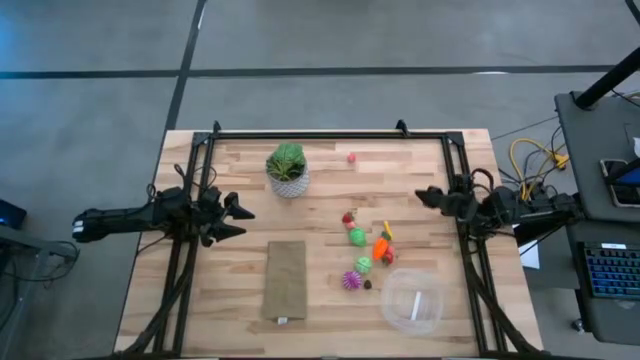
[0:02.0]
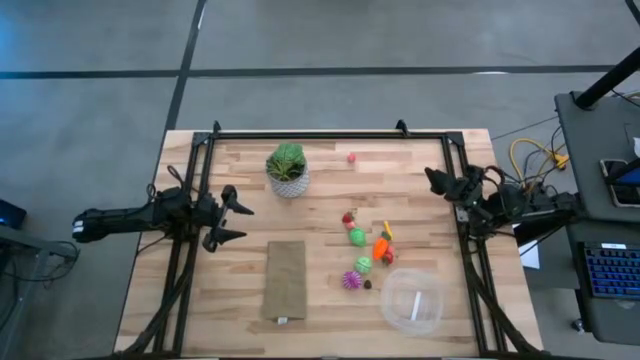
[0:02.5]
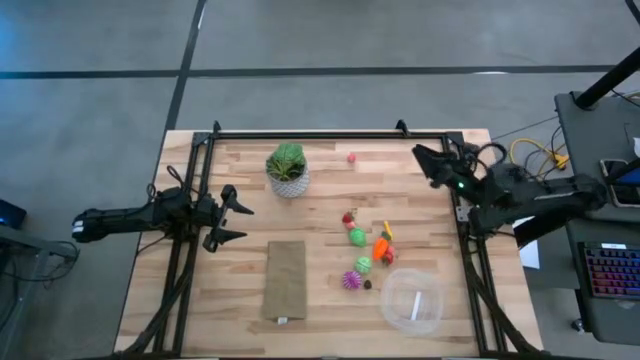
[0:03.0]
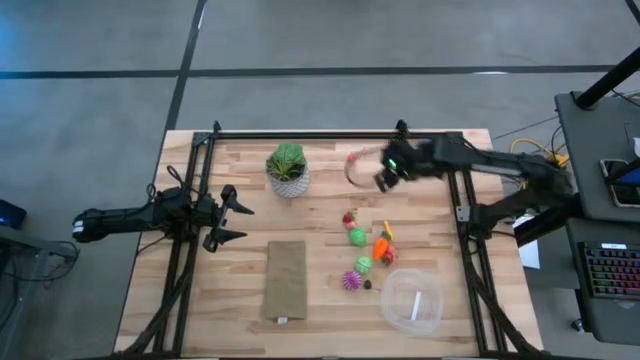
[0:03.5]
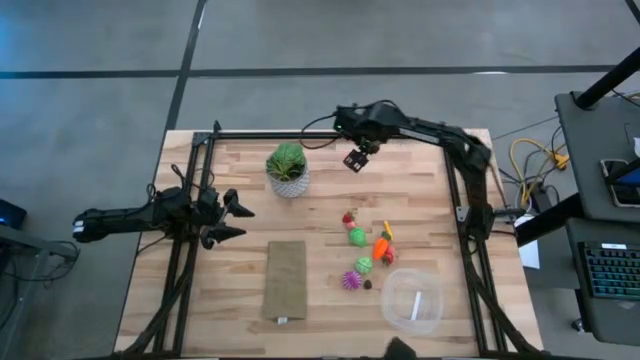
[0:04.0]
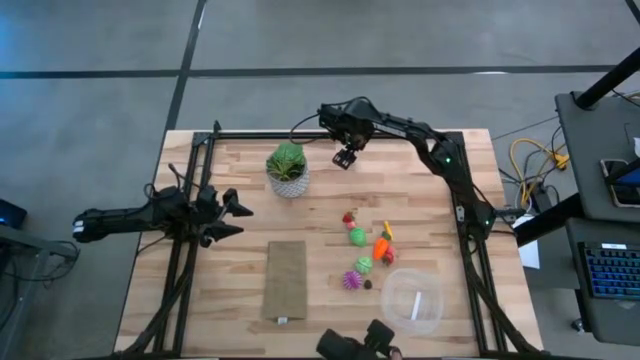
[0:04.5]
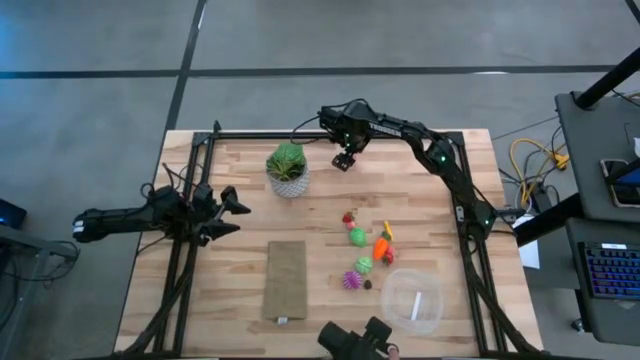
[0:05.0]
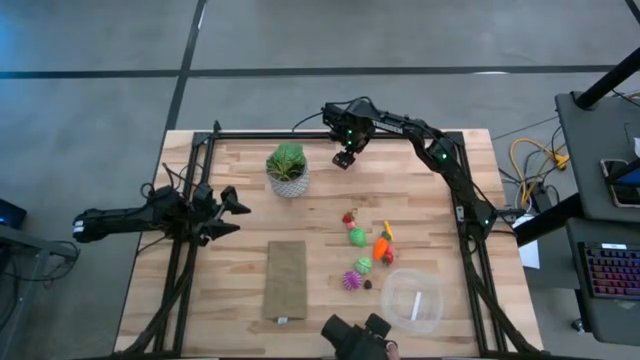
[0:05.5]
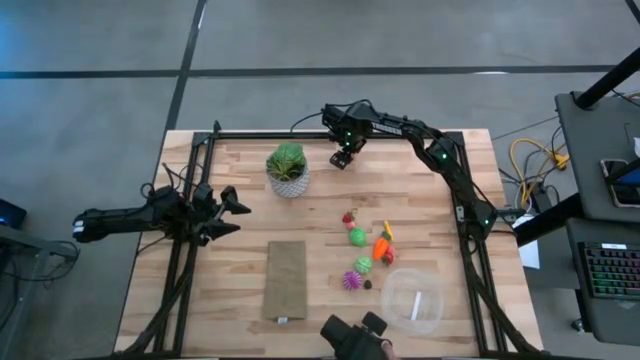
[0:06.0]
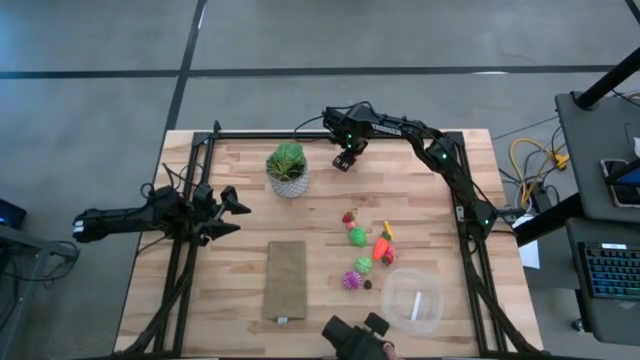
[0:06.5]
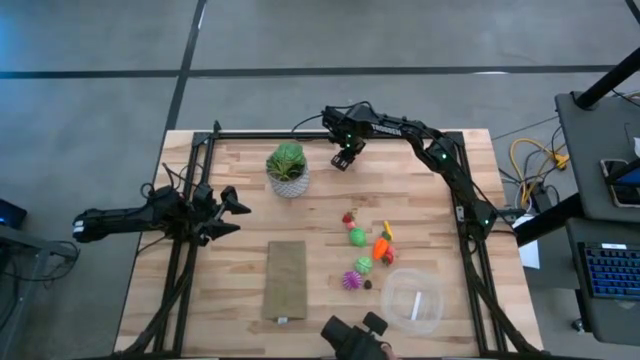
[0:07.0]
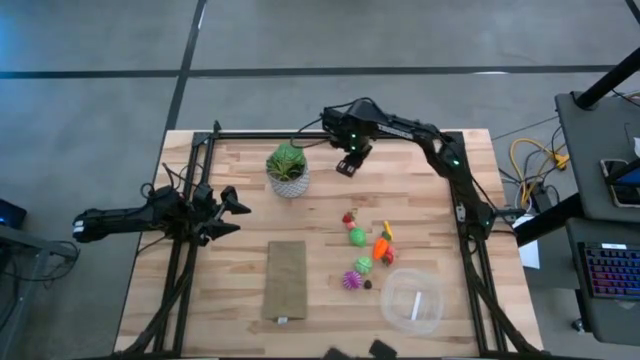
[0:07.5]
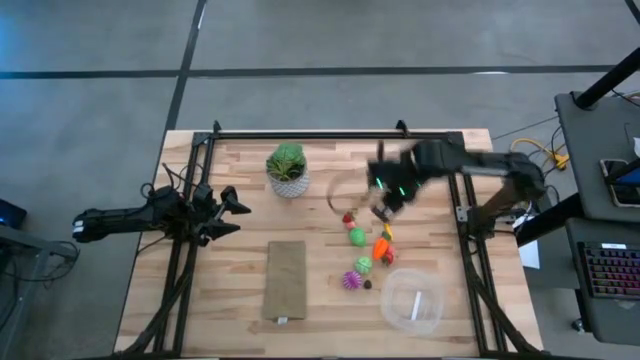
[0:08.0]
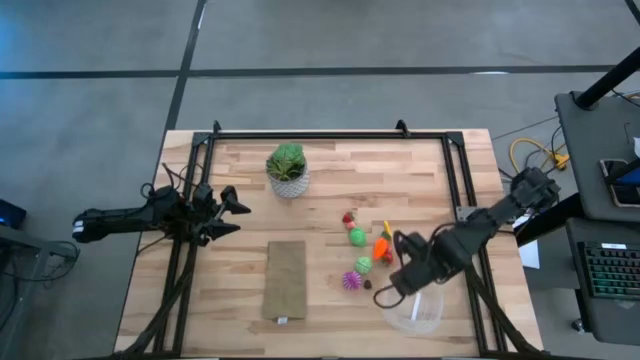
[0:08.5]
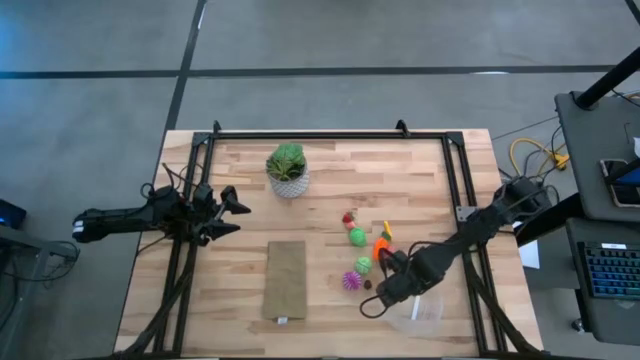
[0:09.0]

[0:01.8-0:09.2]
Task: Pick and placing Produce into tupperware
Put the top peach into the transparent container

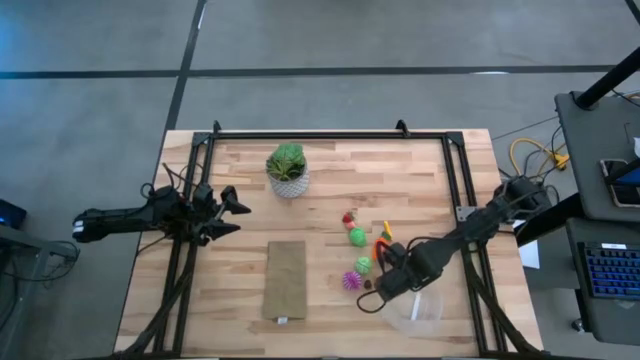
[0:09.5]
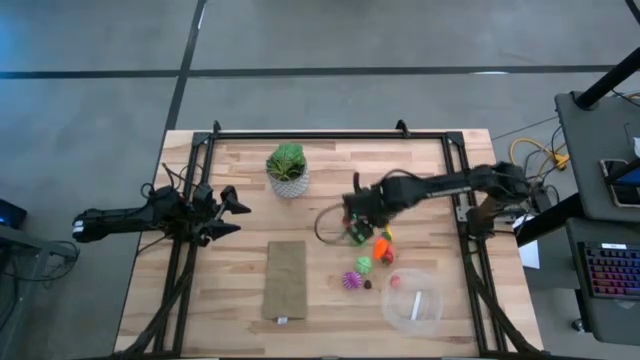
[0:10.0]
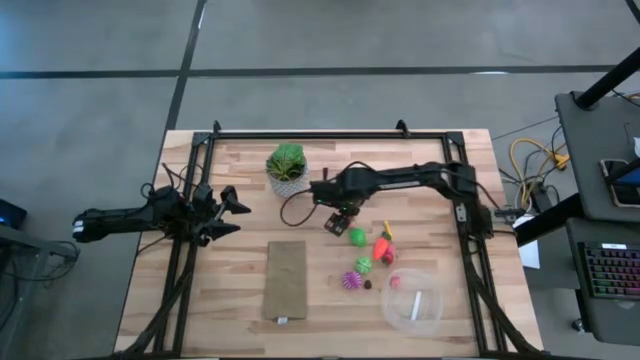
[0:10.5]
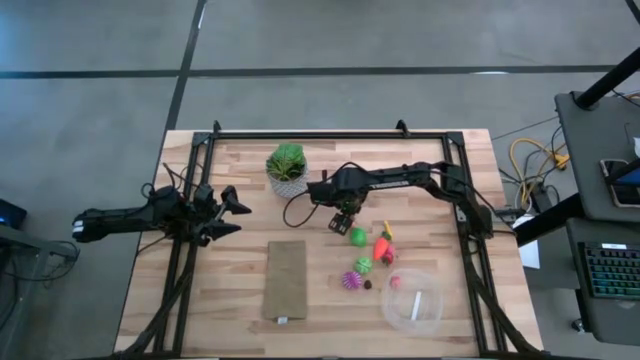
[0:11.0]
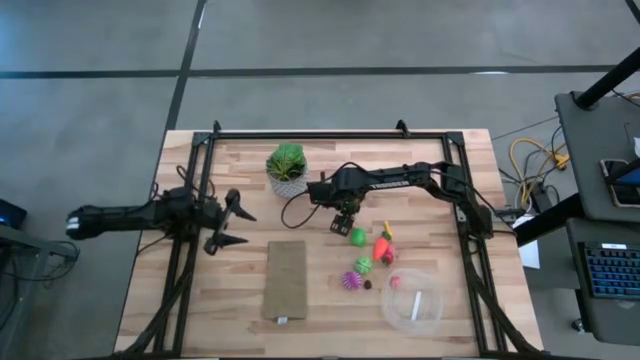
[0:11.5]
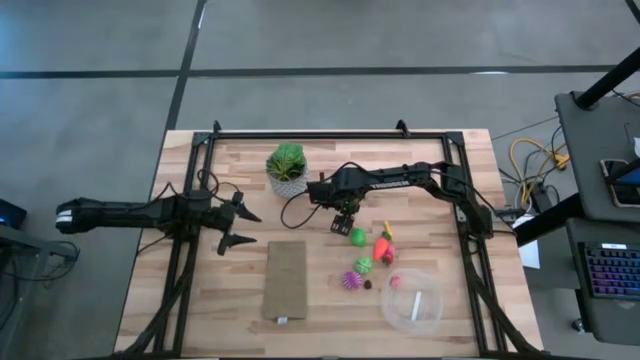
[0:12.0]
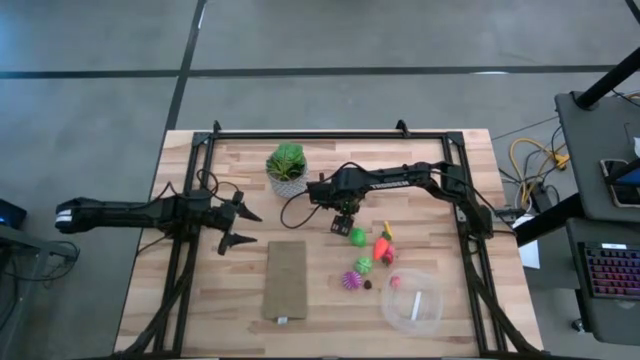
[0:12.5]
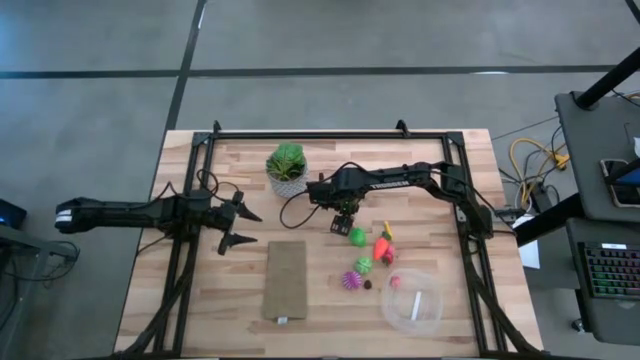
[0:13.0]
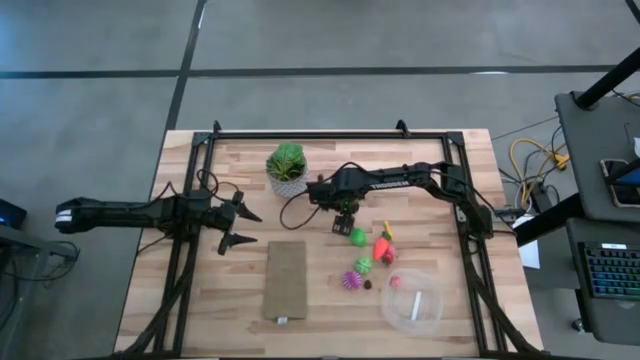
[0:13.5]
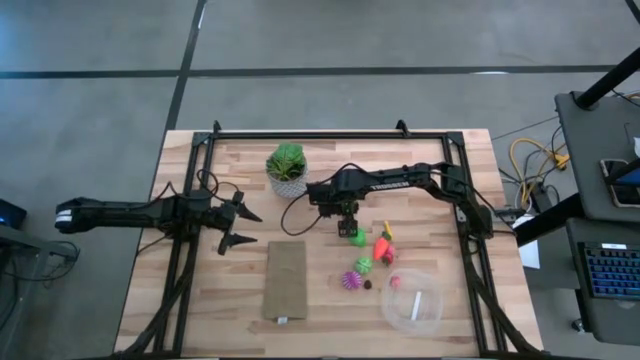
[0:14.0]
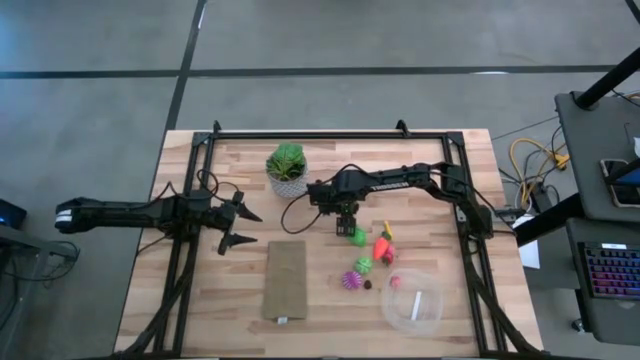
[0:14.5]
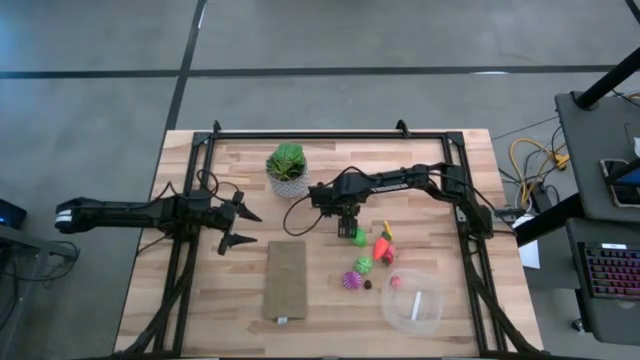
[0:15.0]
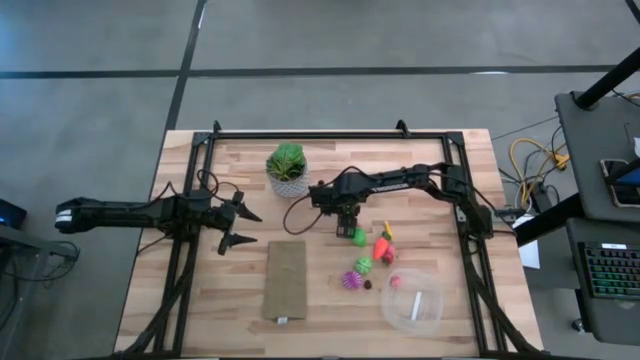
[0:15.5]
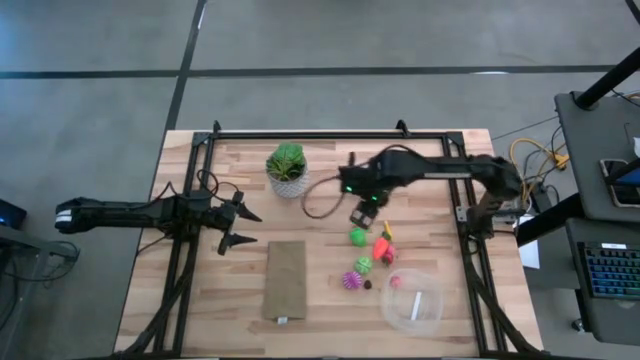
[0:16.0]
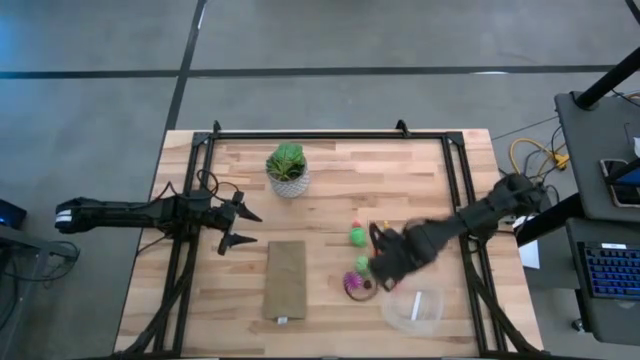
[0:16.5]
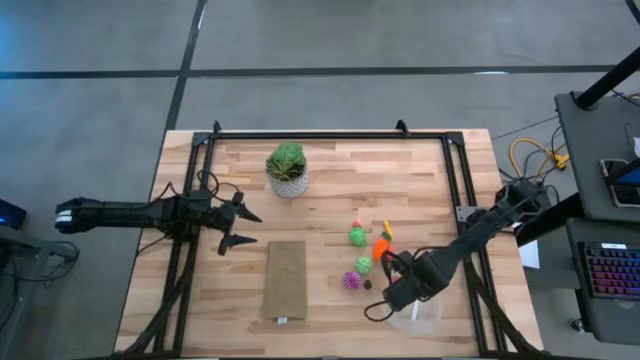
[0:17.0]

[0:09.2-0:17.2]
Put the top strawberry into the transparent container

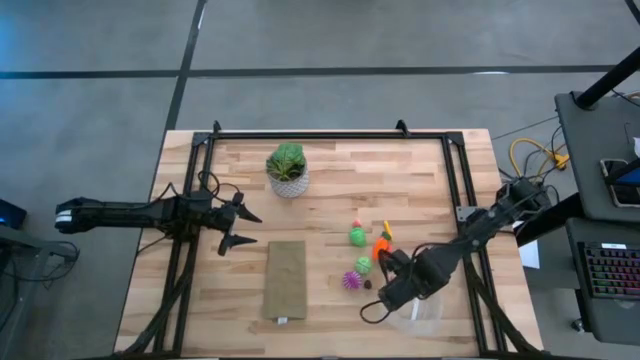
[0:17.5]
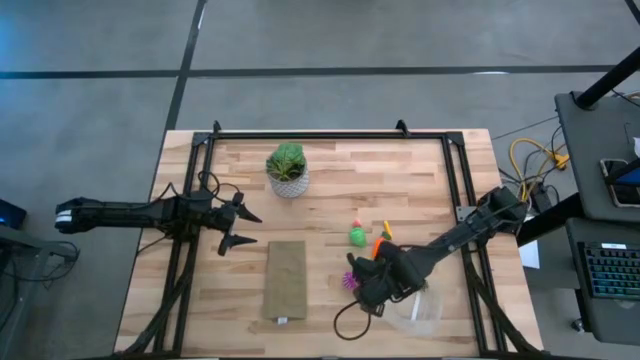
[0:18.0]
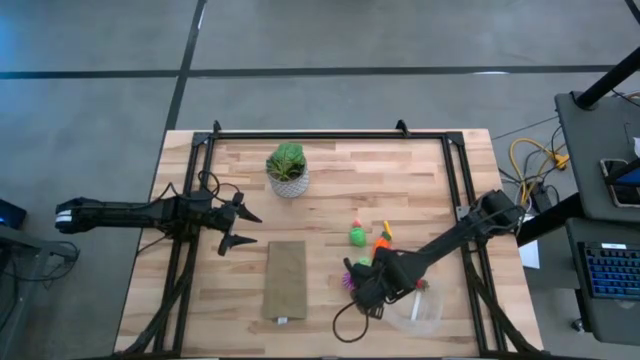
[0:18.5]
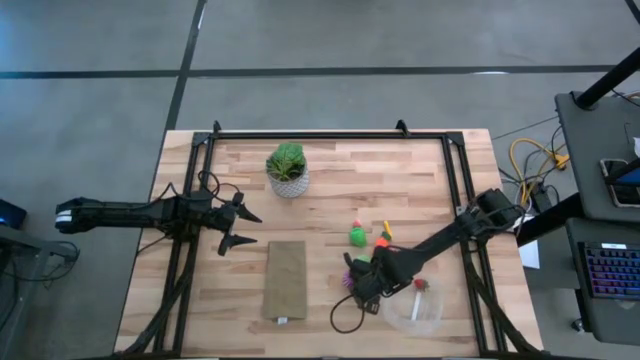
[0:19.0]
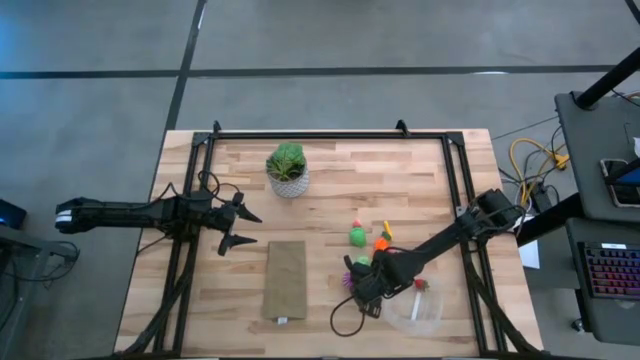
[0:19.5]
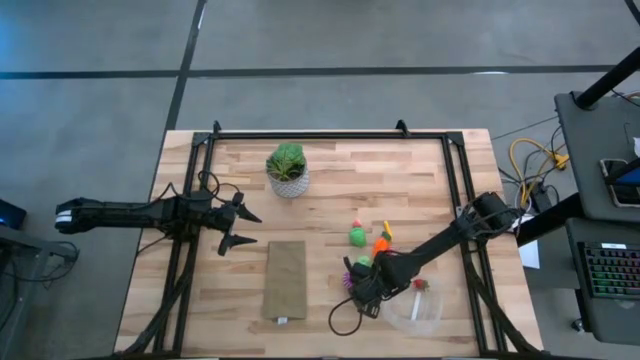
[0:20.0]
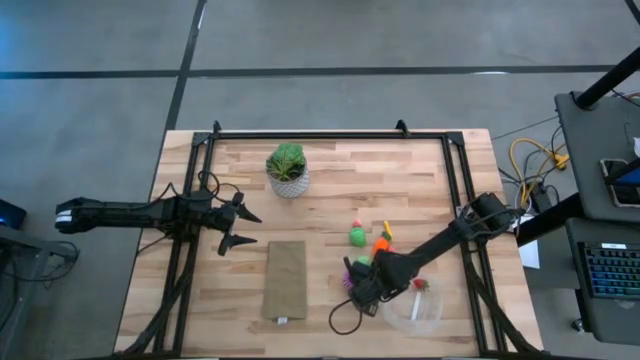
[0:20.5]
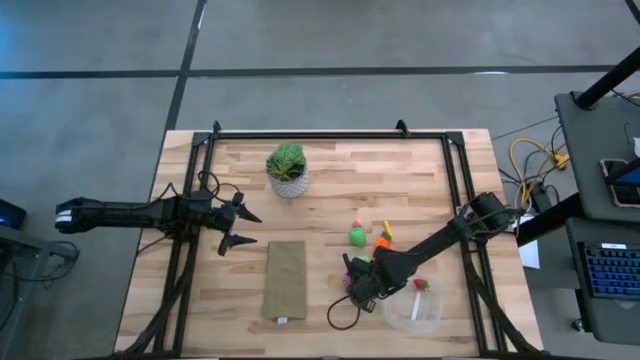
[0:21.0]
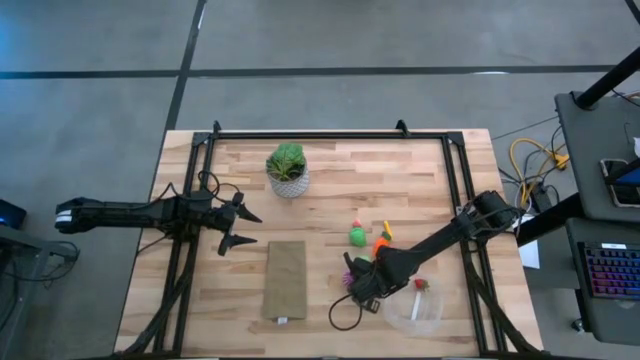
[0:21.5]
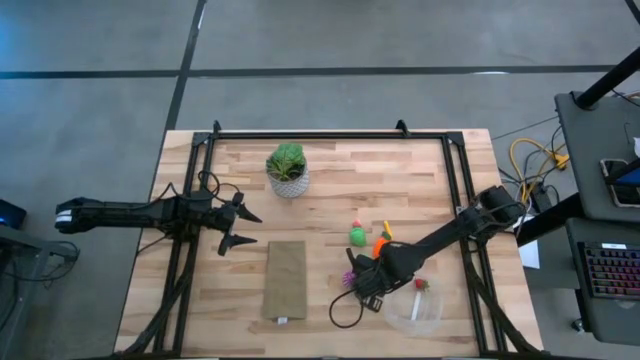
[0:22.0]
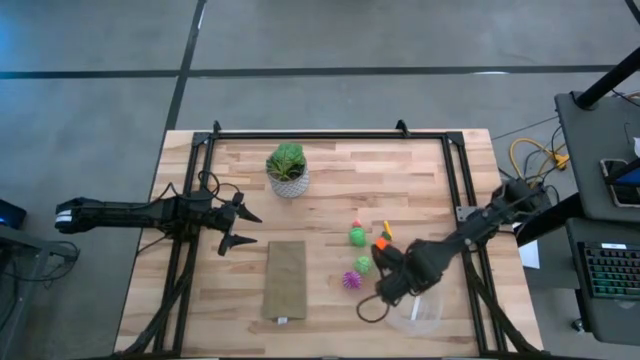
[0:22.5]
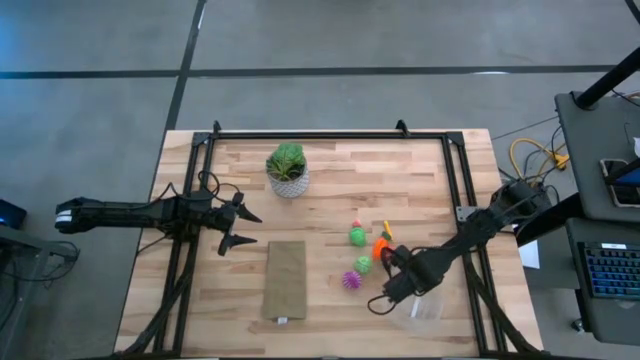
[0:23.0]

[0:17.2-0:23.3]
Put the blackberry into the transparent container
